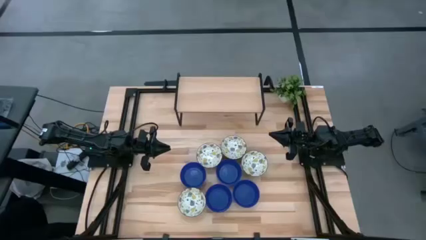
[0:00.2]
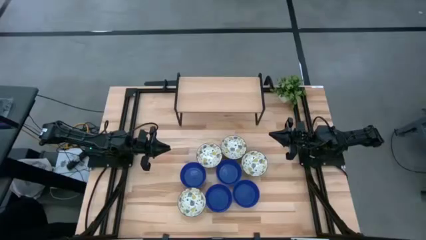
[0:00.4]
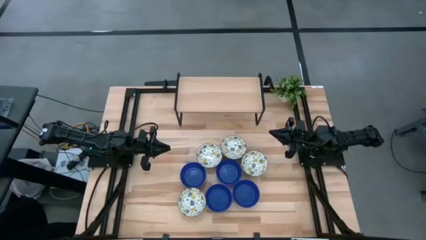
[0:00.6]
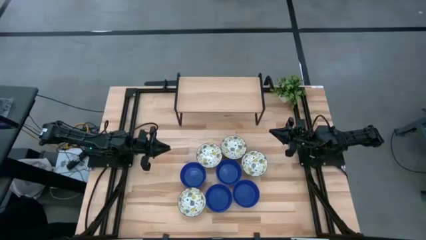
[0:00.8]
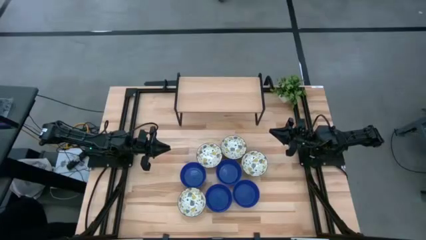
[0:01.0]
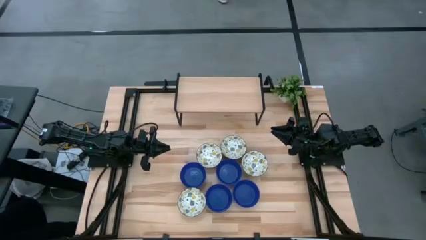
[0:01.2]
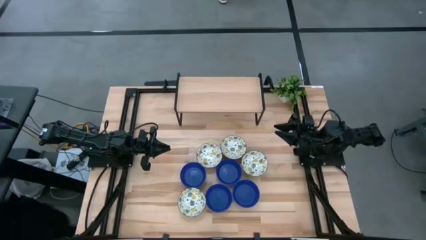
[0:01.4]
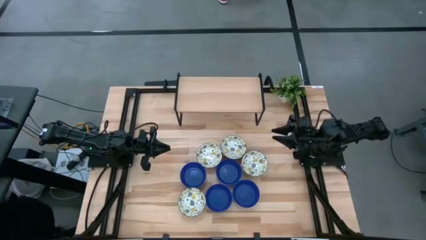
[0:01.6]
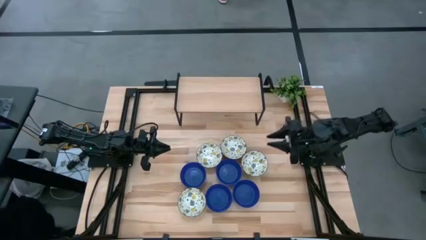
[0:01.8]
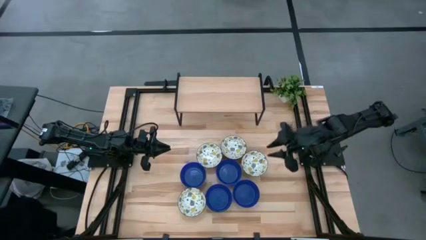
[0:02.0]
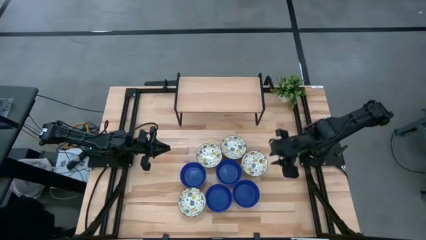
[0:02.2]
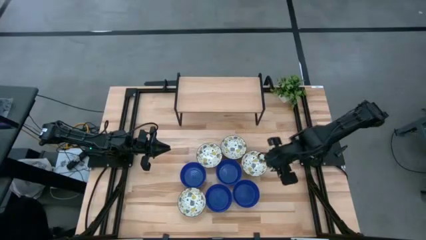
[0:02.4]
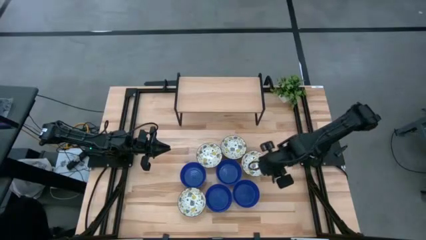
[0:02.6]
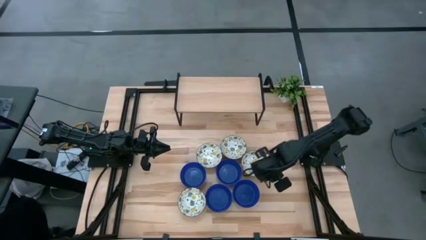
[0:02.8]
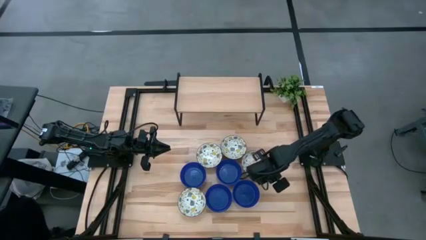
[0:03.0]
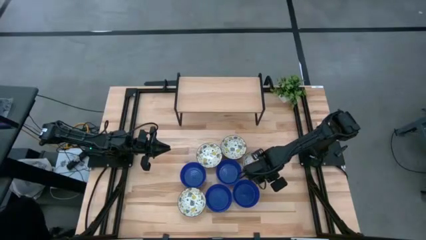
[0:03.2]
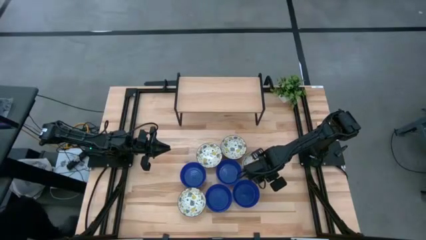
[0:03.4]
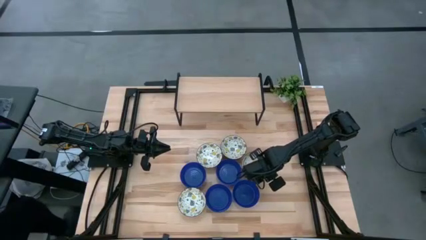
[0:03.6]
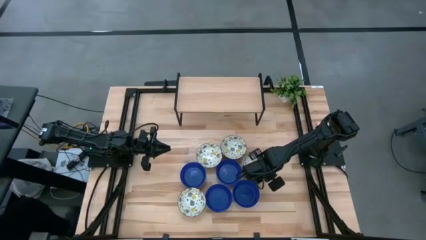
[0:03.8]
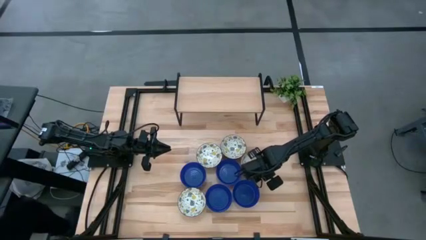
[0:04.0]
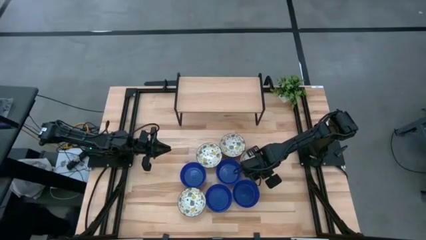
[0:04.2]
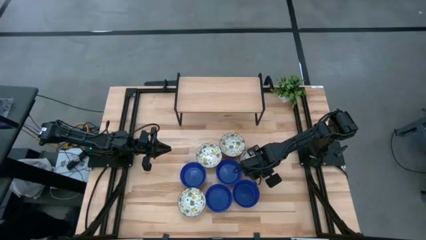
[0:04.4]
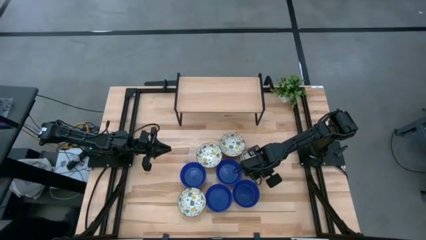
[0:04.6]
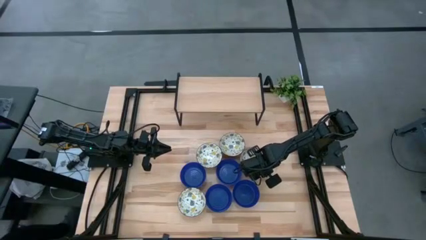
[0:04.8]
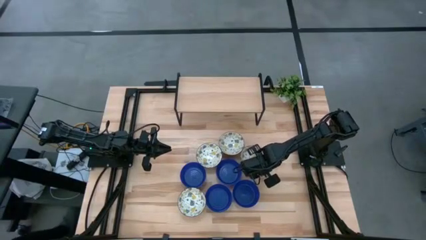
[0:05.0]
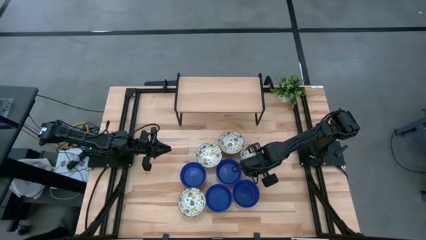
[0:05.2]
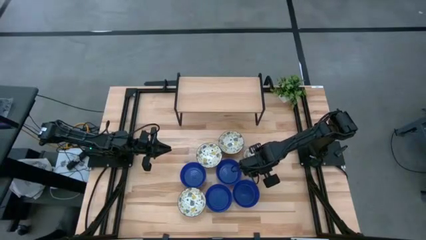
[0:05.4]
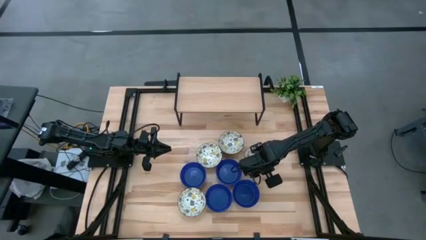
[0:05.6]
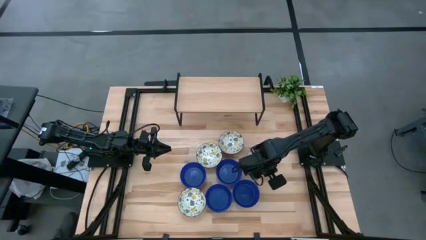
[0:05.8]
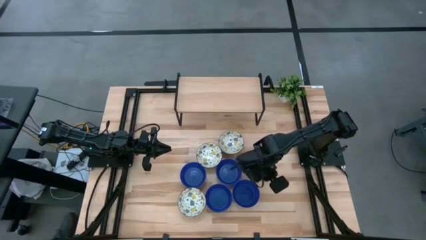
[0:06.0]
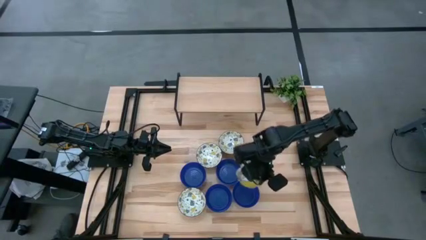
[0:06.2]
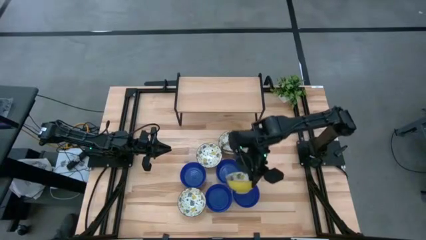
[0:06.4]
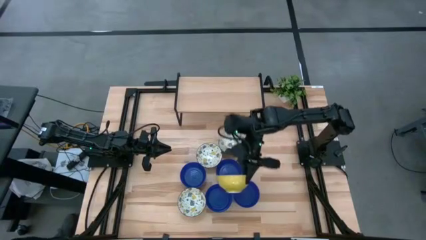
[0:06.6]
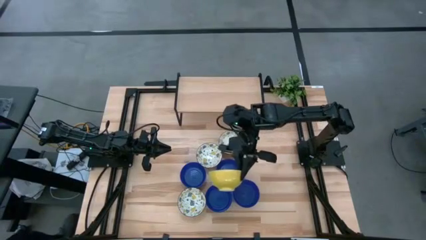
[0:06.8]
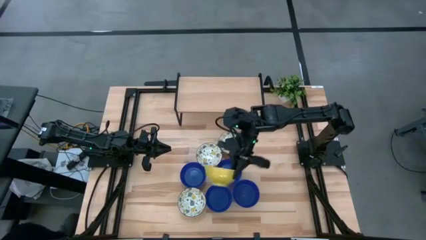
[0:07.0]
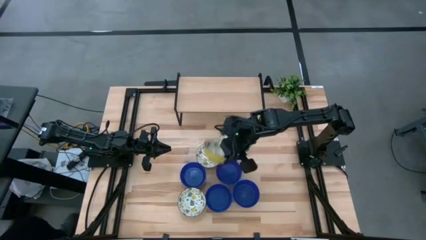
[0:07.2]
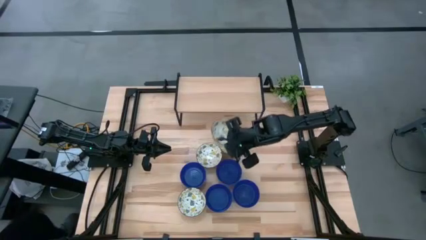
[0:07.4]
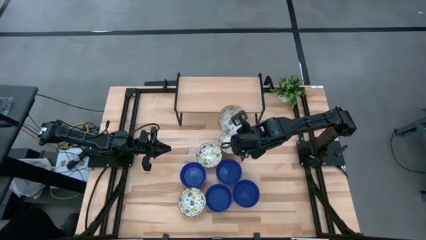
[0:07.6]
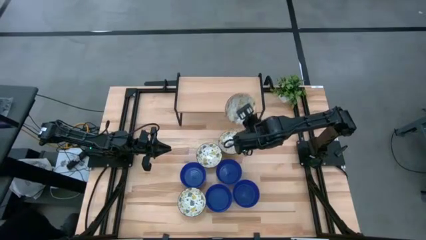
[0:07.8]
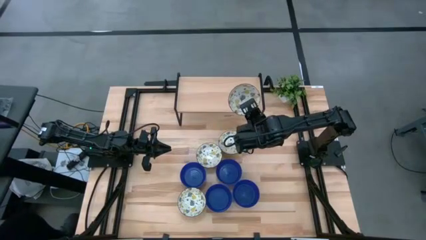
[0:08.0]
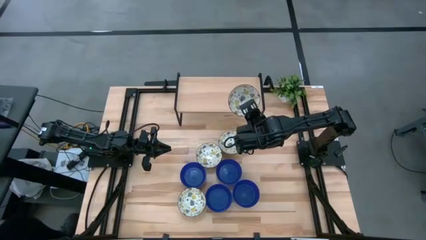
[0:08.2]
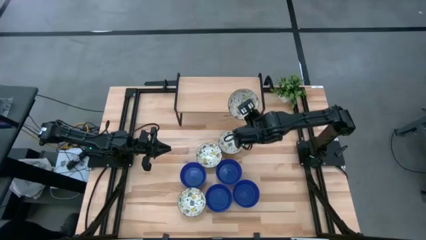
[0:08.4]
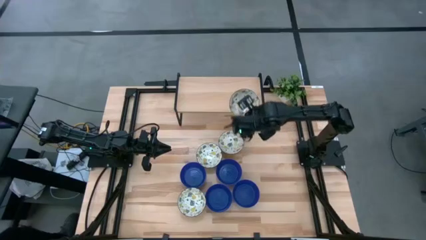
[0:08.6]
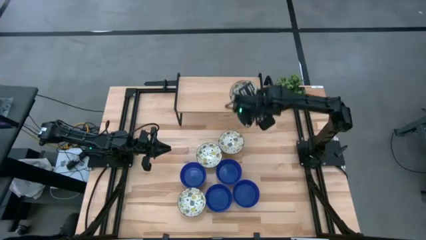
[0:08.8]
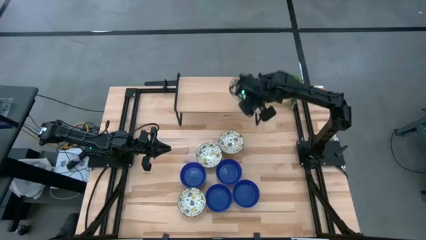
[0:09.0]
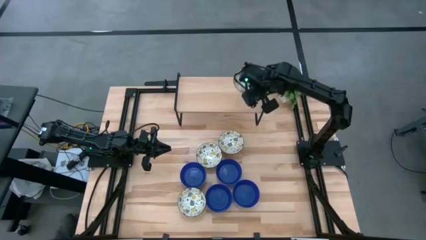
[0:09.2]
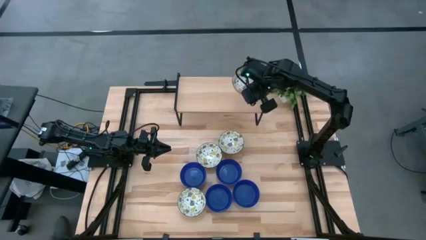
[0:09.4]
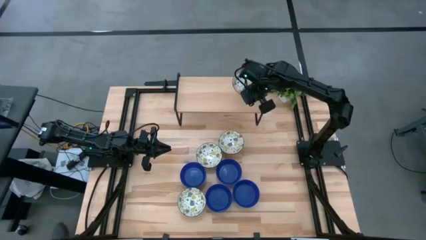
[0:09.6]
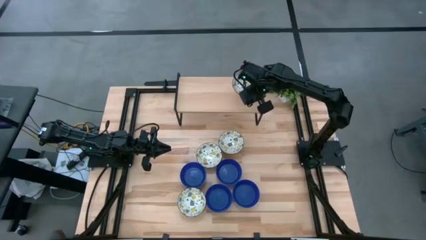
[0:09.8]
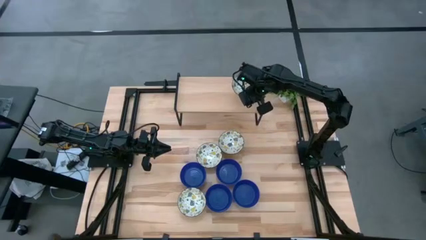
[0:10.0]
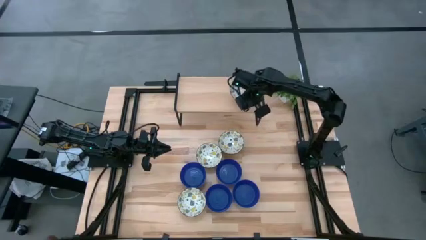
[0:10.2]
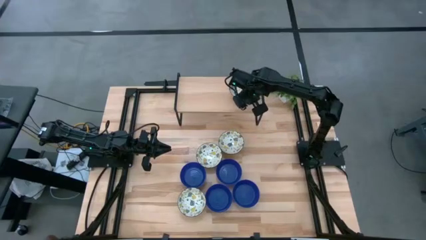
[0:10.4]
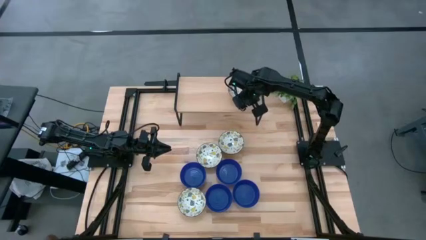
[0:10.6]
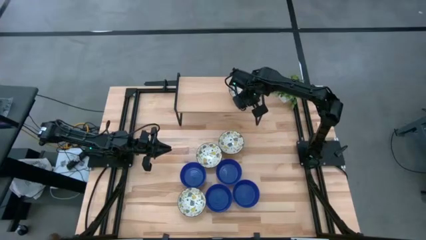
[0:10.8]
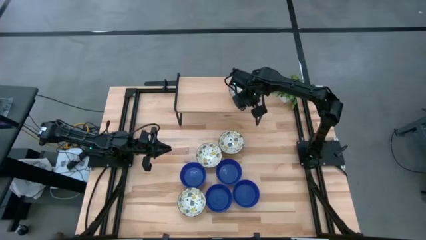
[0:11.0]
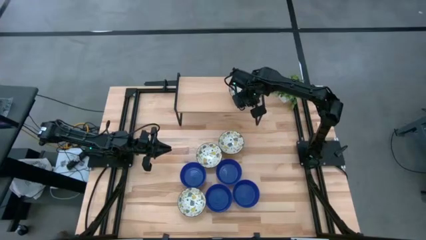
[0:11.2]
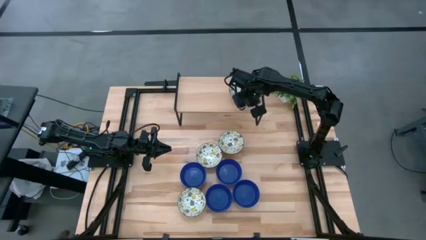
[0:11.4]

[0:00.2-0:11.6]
Task: Pick & Place Mini bowls
Put the yellow bowl on the shelf
